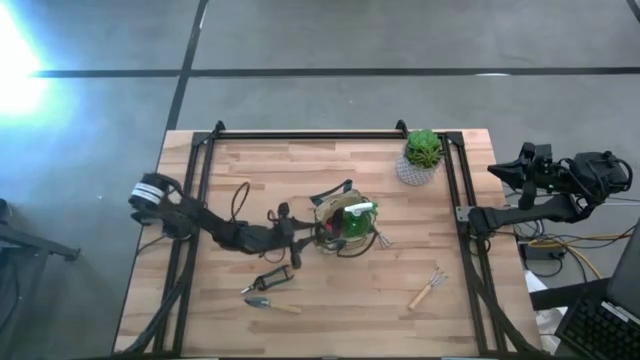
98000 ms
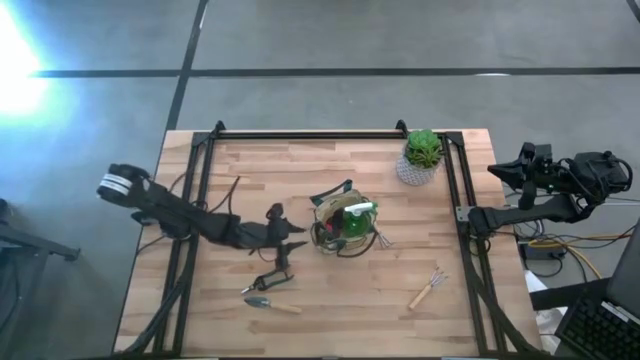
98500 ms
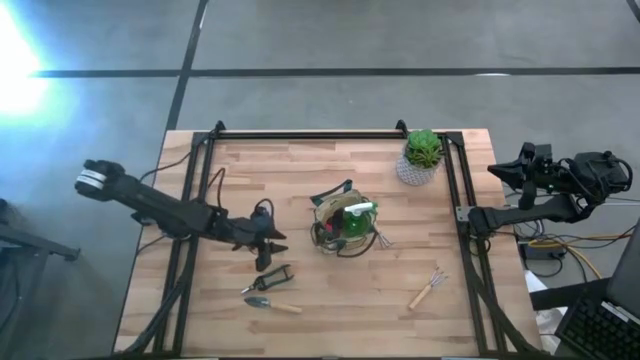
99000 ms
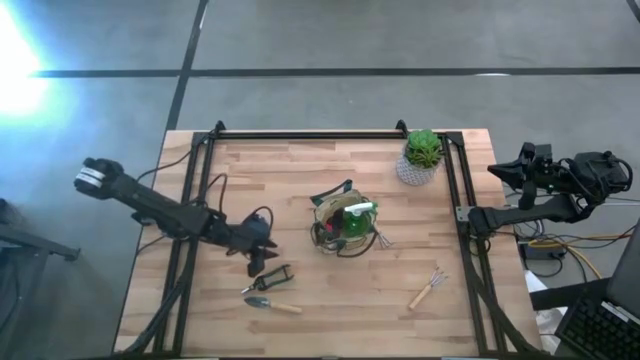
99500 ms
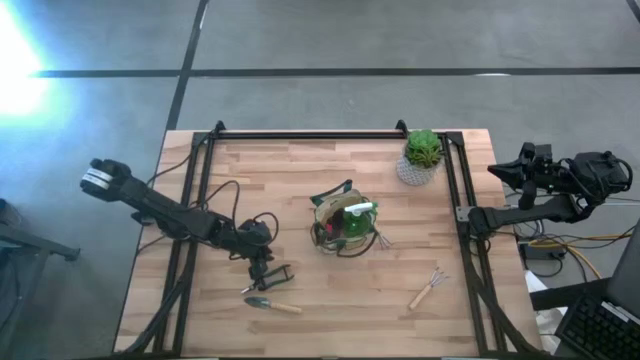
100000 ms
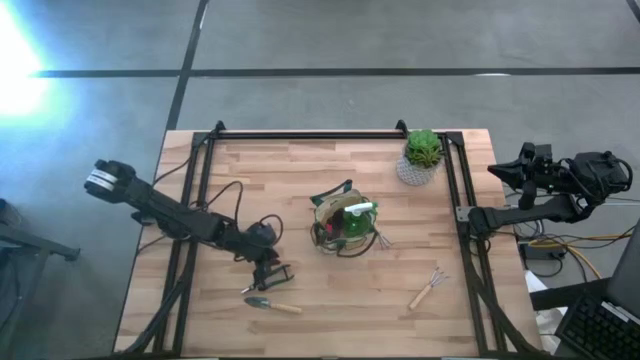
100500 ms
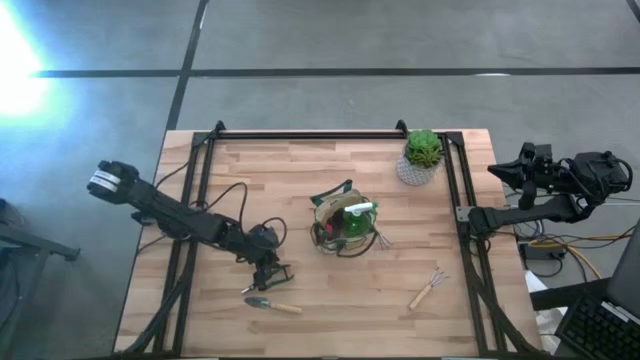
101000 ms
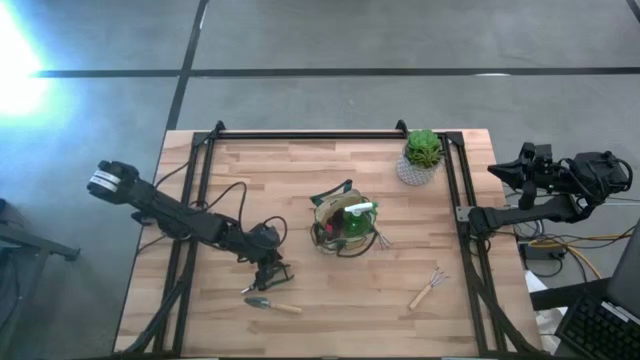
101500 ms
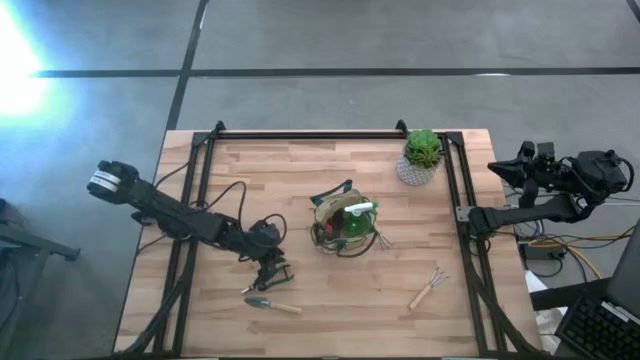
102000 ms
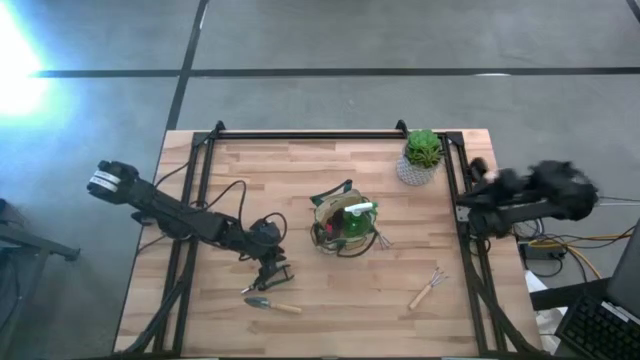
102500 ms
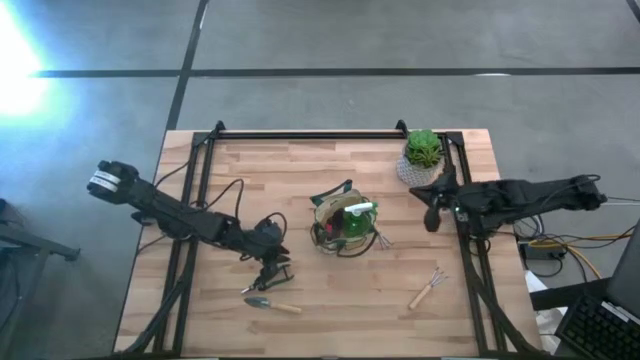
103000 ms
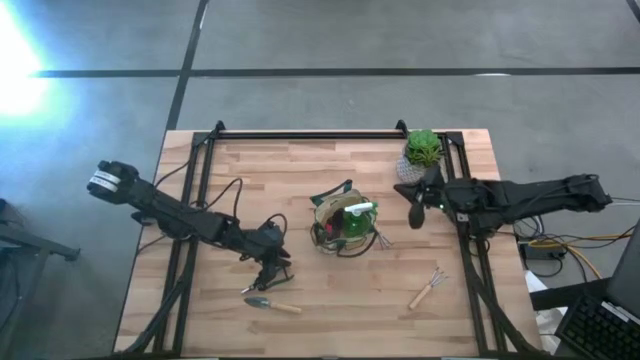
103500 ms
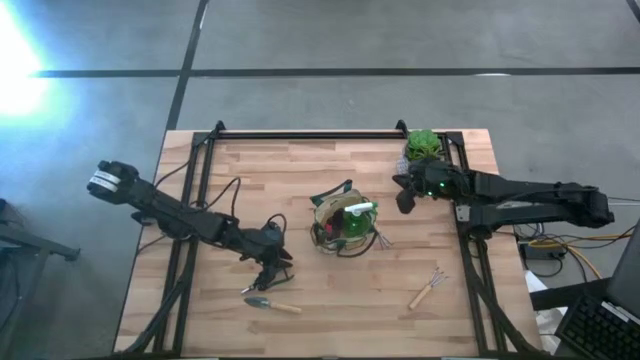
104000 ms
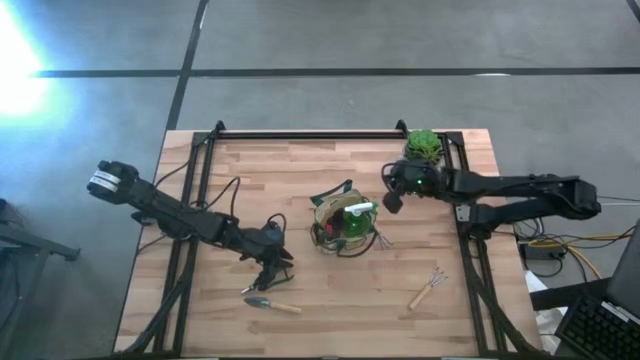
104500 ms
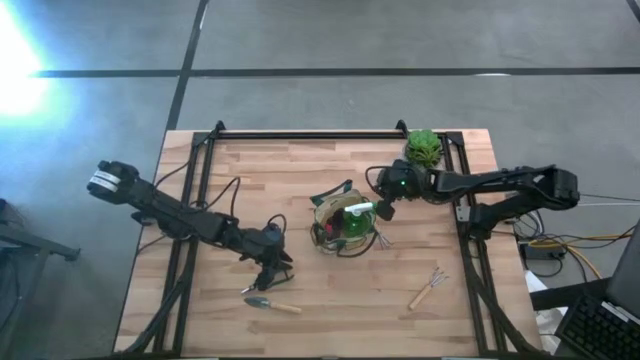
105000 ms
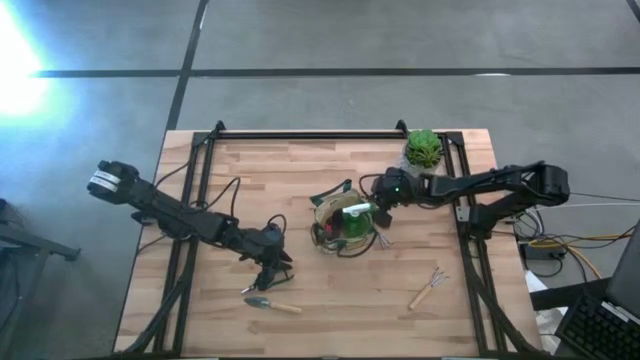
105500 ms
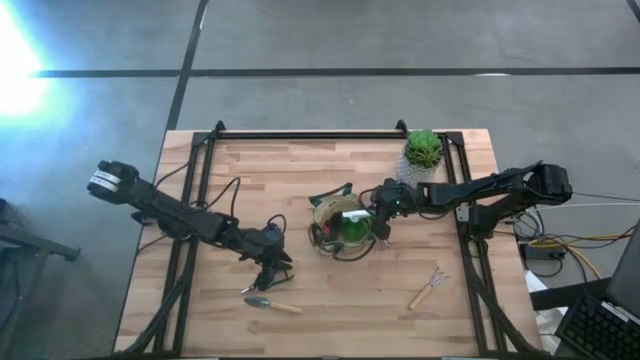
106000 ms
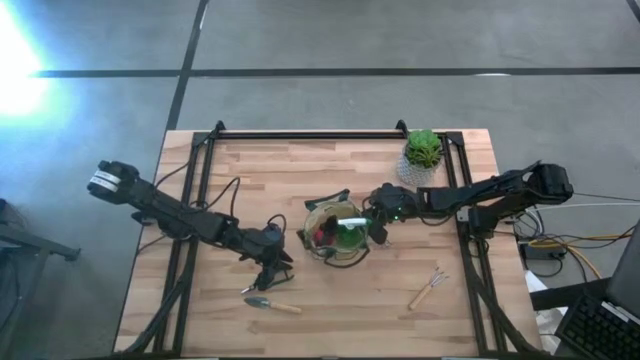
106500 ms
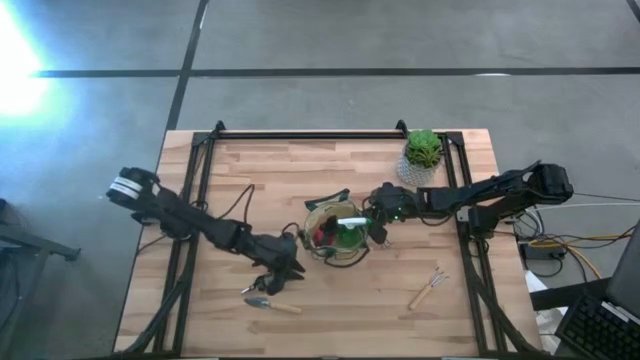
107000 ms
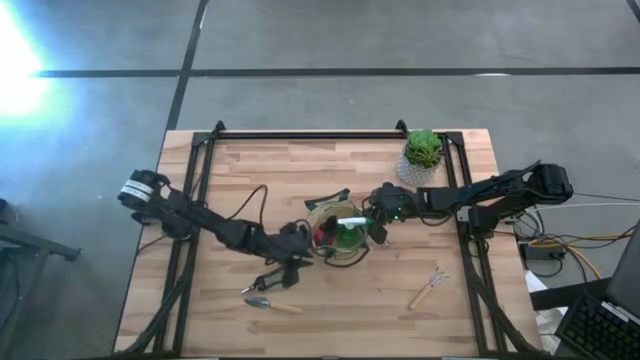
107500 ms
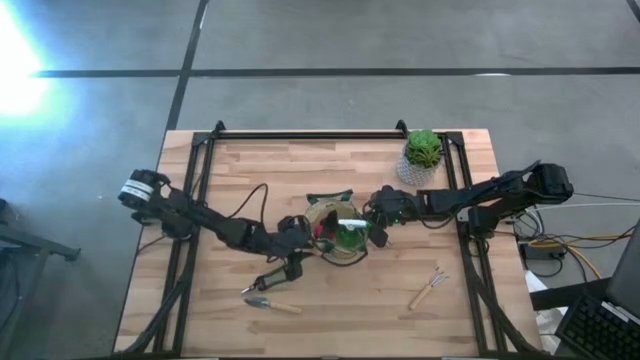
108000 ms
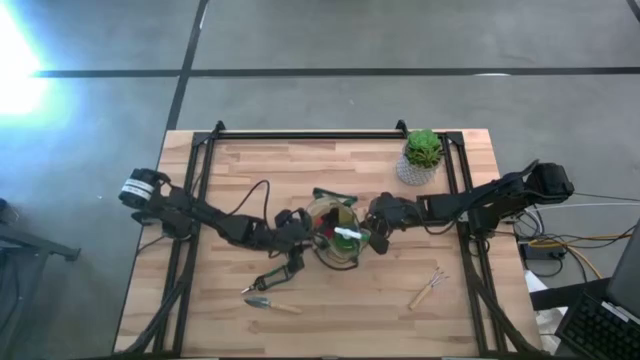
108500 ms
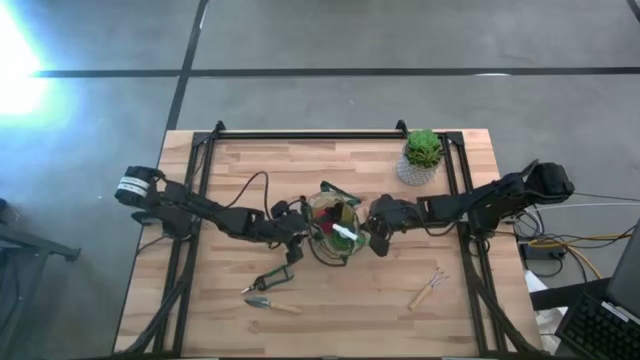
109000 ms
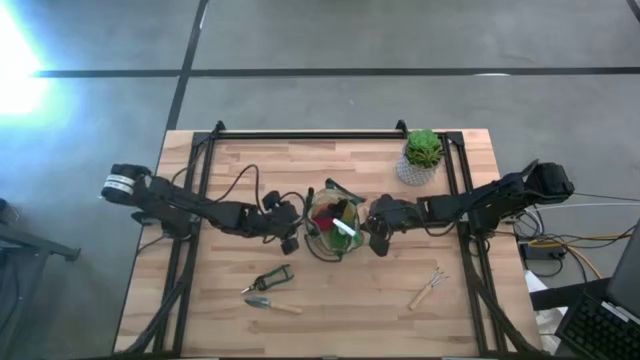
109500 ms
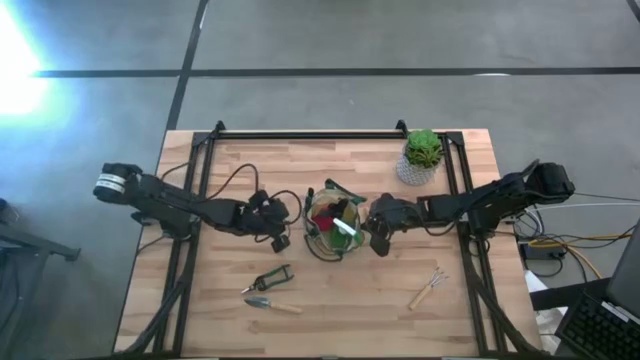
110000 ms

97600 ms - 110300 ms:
Task: Pick & Place Garden tools in Gardening bag
Adjust the light brown gardening bag on the table

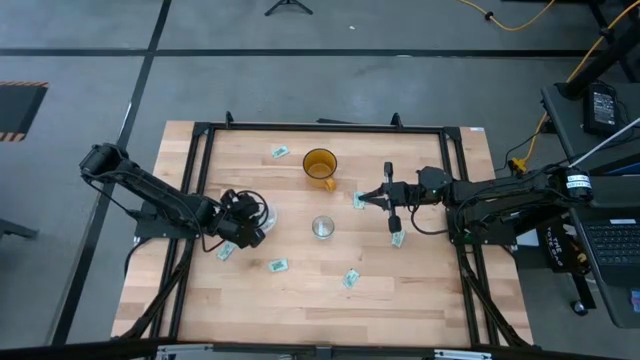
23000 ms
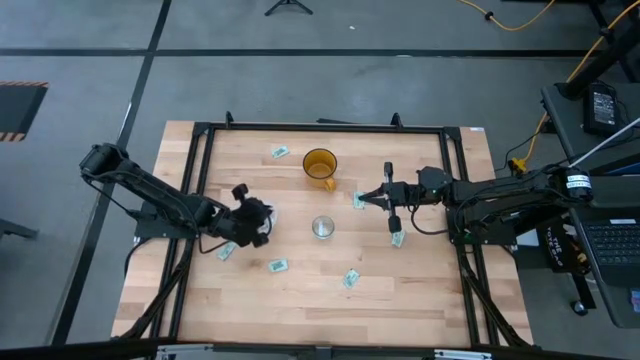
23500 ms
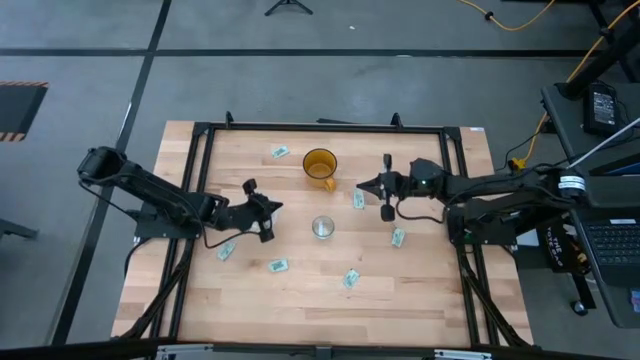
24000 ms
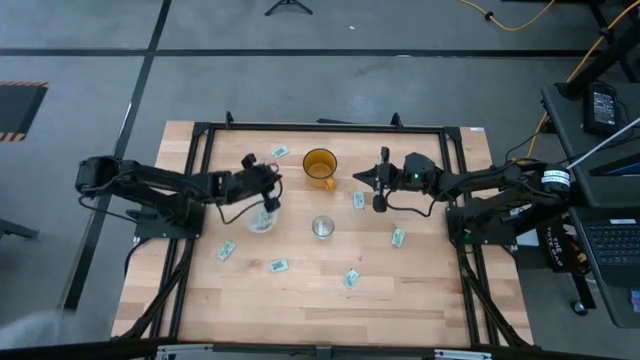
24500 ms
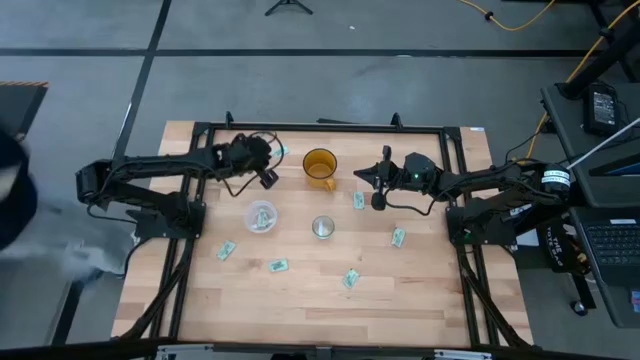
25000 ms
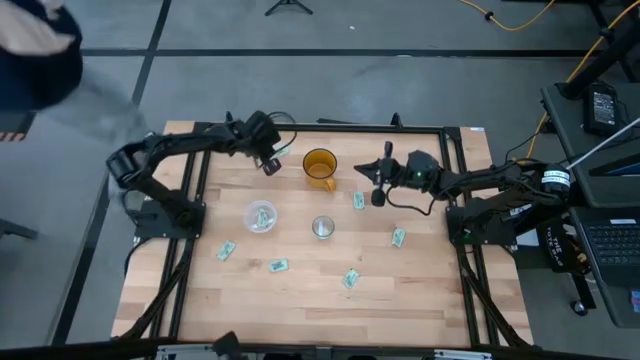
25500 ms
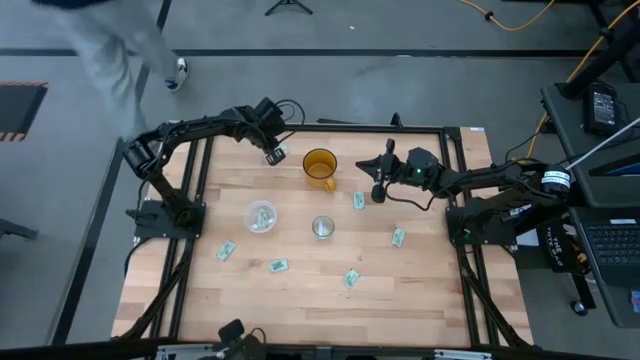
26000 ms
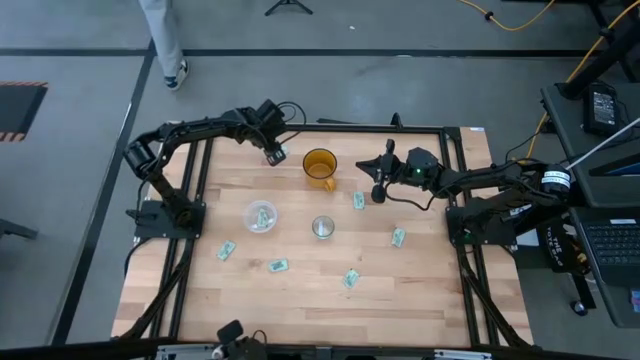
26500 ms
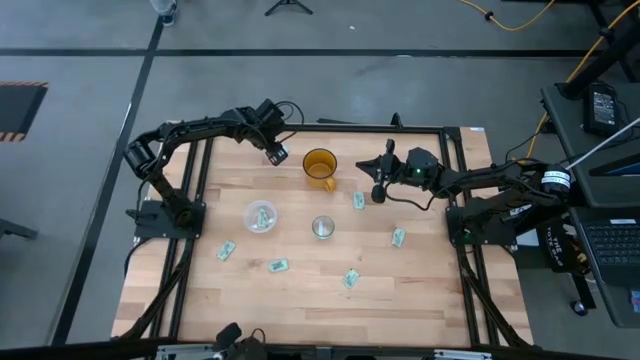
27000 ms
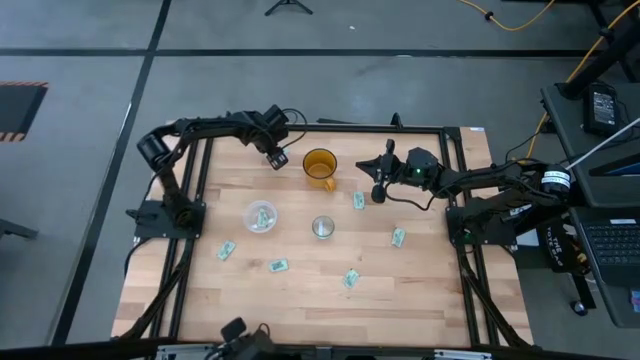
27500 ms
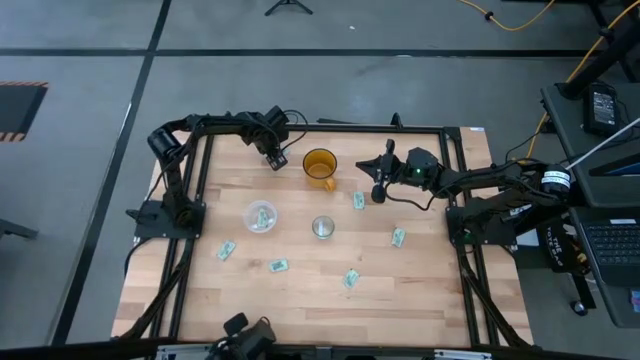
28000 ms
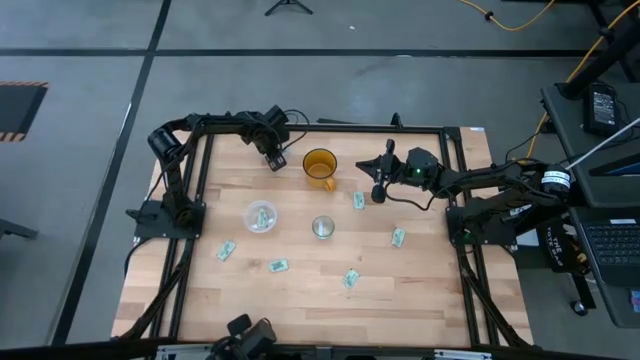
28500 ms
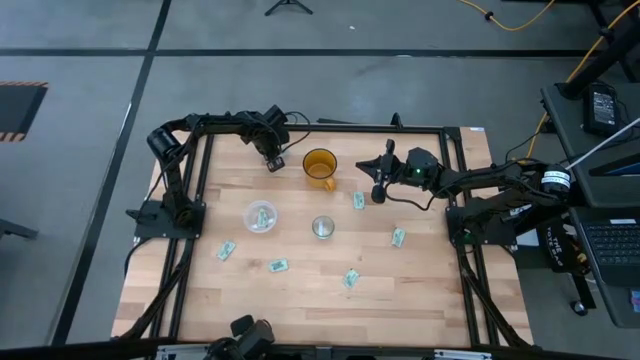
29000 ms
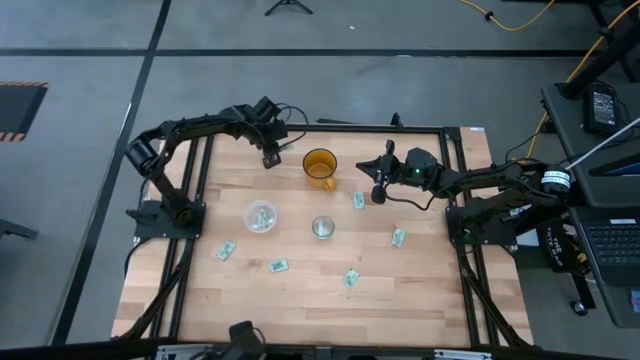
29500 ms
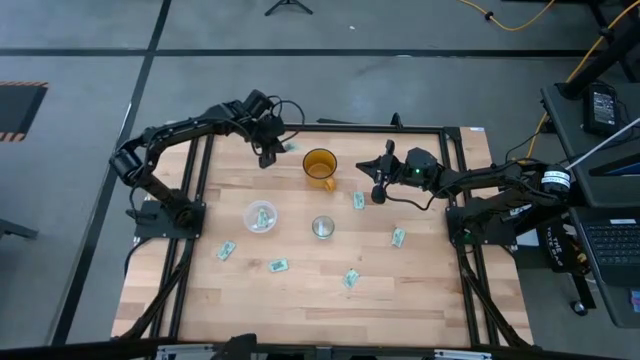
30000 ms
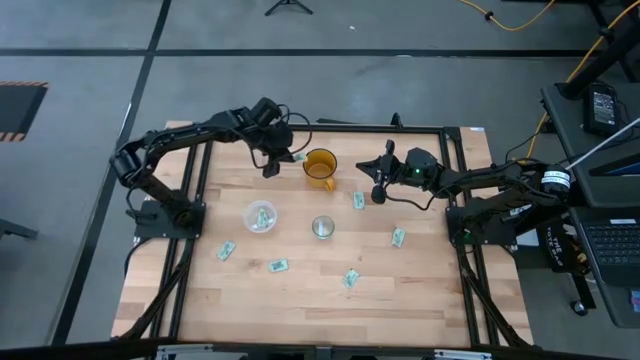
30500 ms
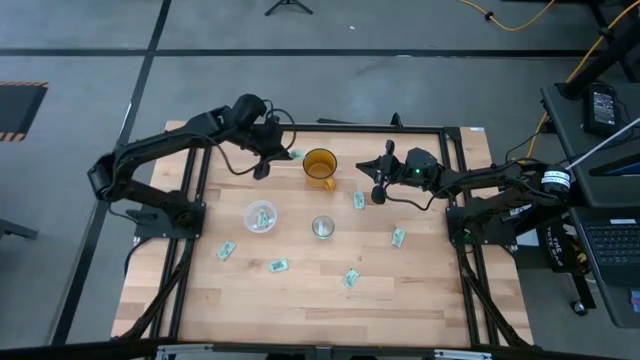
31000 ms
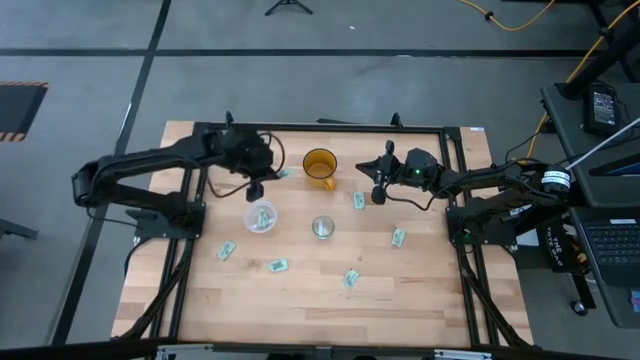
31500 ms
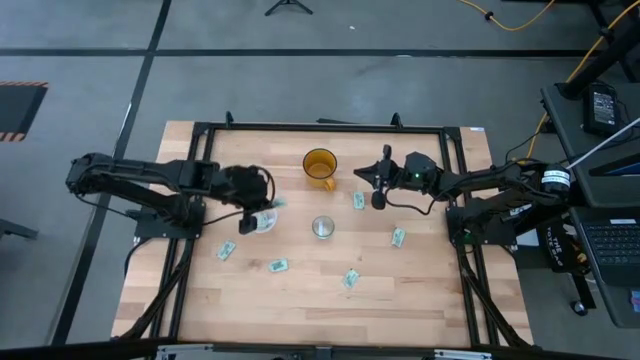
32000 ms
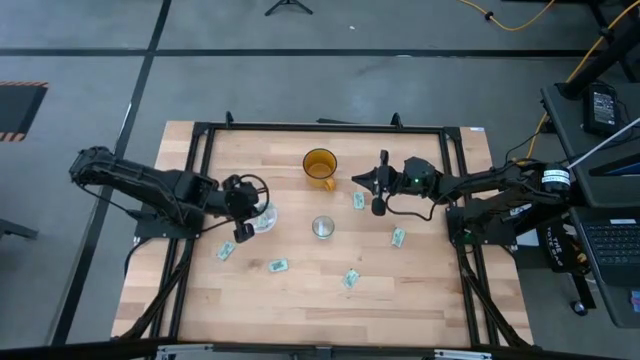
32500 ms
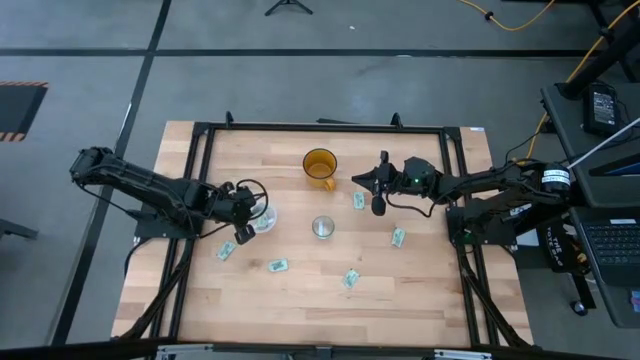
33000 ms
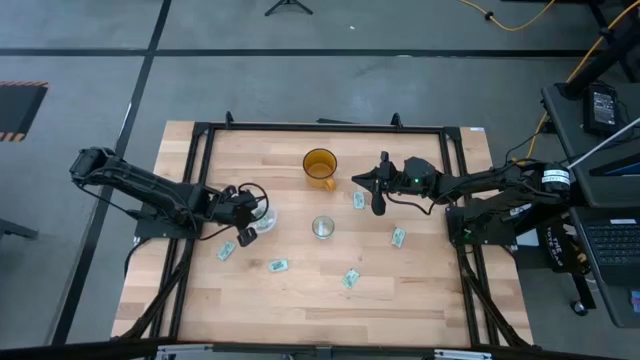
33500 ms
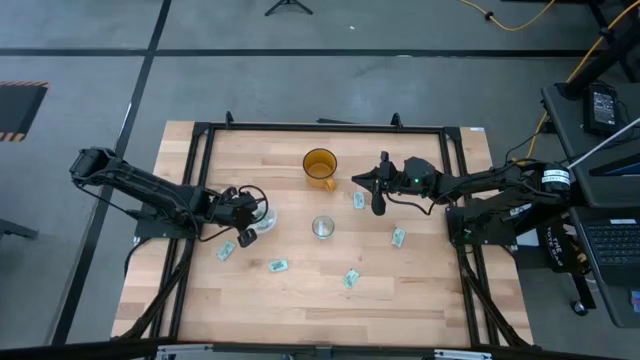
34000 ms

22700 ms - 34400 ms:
Task: Pick and place Stevia / Truvia into bins
Put the stevia packet into the plastic tupperware
